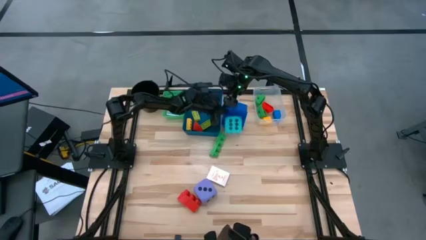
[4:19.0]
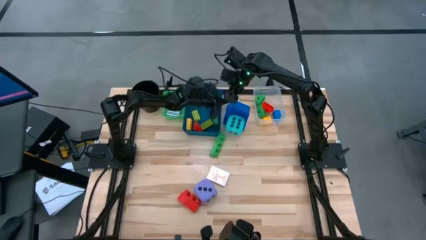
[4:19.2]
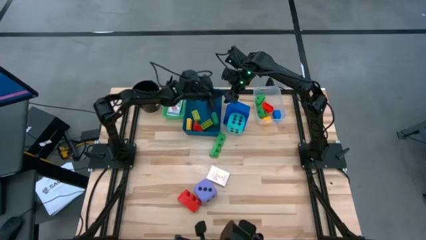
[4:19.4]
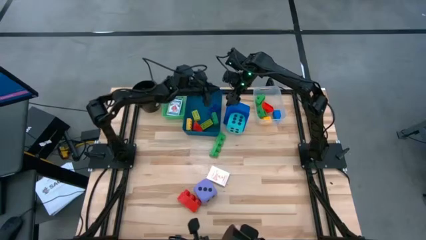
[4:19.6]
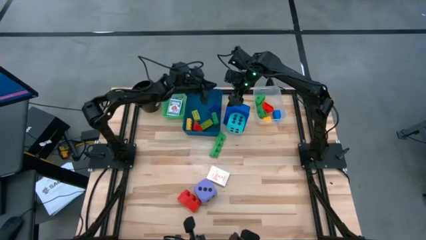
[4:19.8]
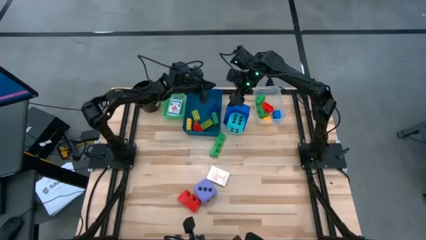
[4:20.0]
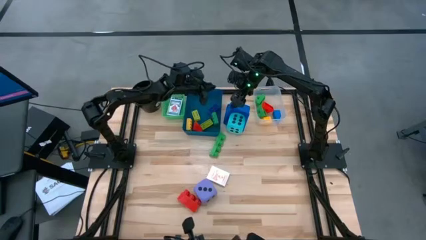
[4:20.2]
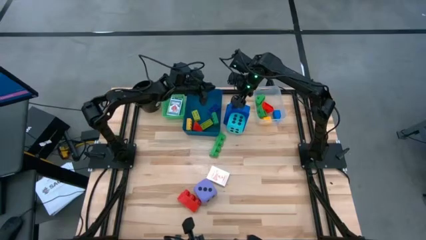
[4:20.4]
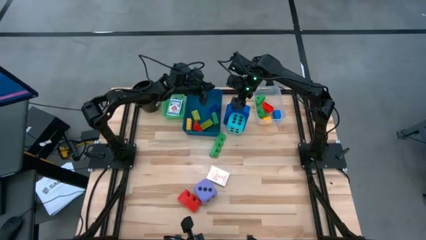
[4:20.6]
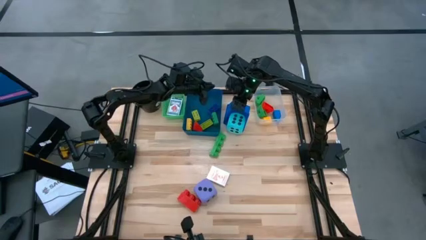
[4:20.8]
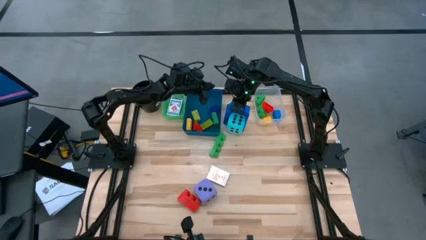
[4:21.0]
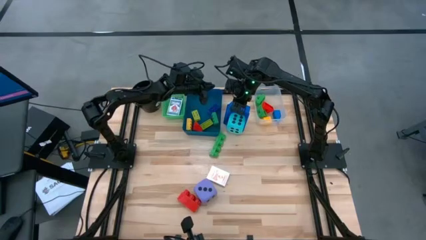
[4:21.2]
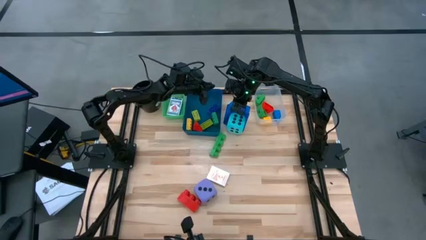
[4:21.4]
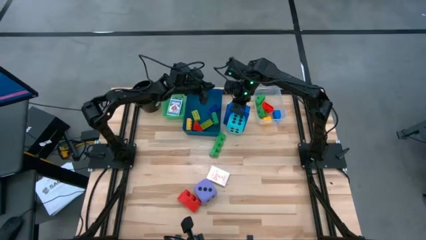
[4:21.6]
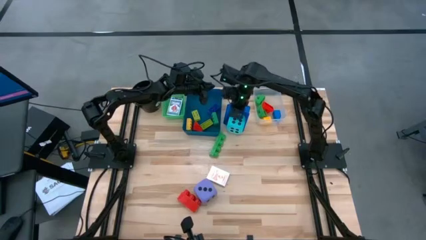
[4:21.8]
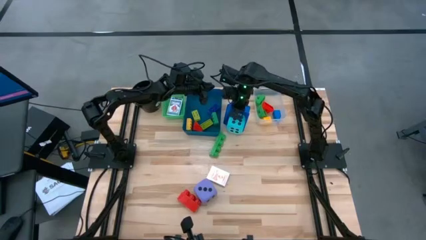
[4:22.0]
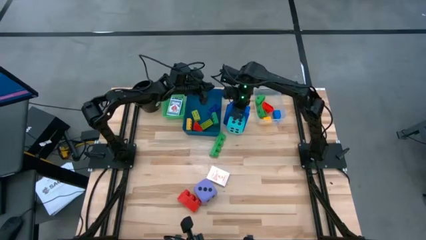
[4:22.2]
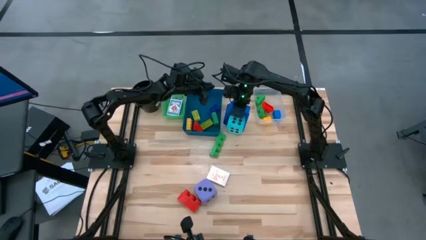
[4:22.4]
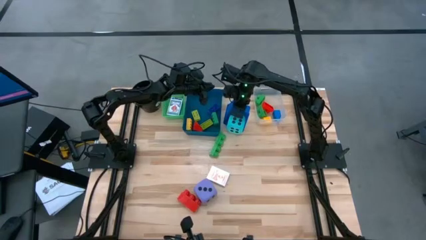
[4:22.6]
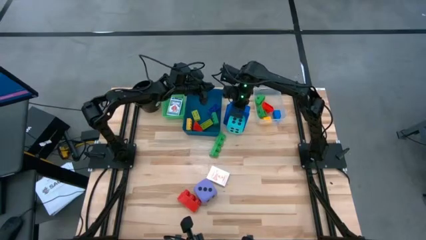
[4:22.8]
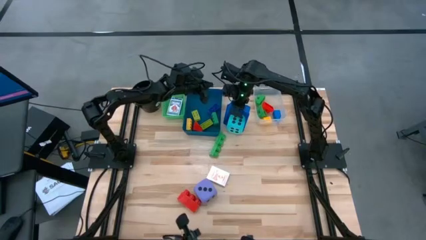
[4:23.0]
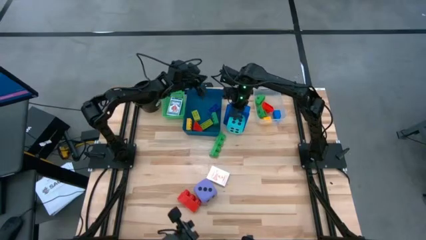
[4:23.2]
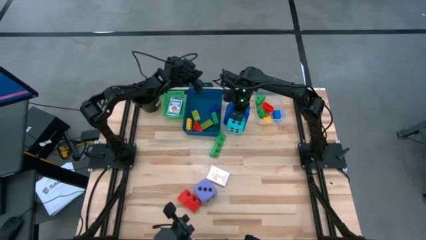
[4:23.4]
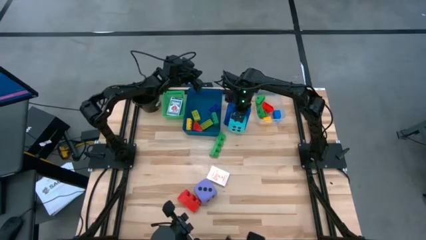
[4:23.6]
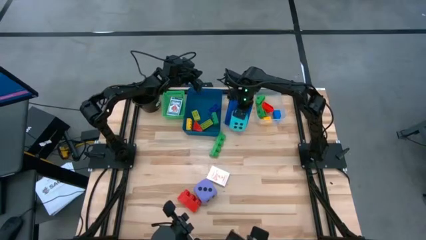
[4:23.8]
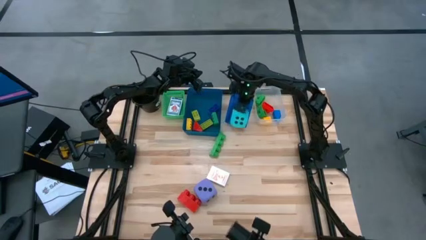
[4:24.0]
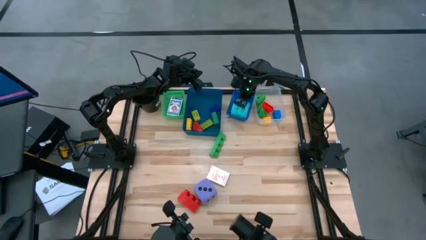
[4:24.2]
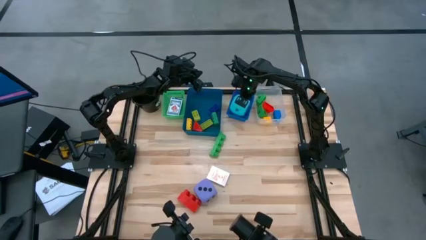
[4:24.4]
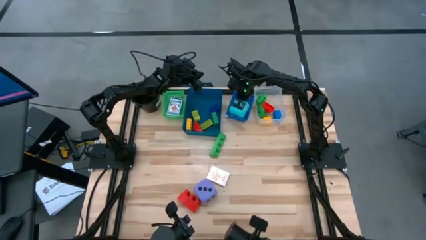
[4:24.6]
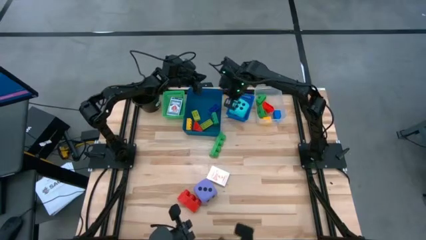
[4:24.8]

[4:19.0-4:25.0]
Task: Pick & Place Toys
Put the blue dice into the blue bin

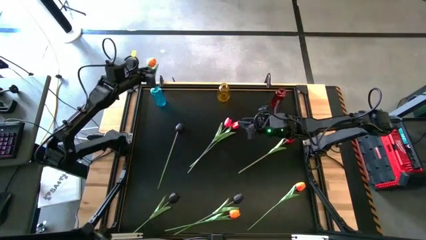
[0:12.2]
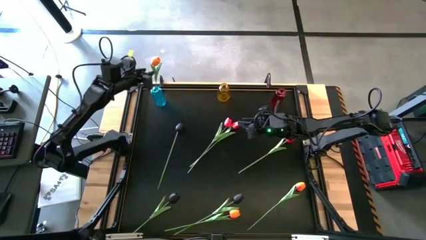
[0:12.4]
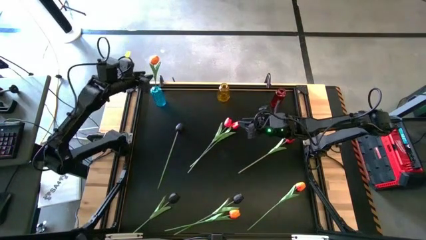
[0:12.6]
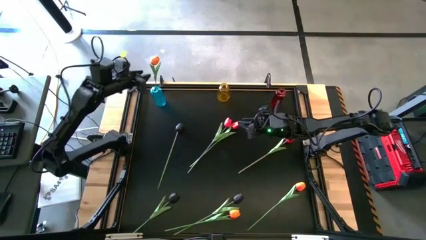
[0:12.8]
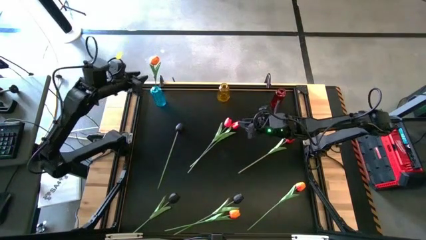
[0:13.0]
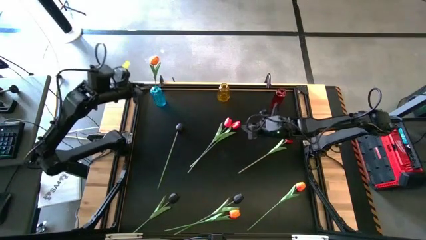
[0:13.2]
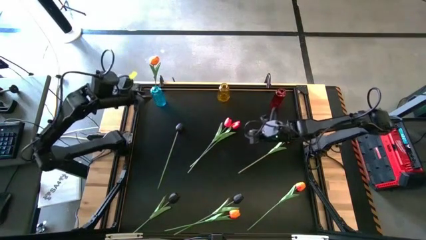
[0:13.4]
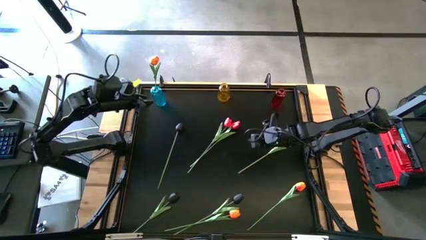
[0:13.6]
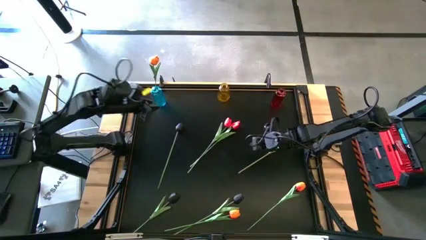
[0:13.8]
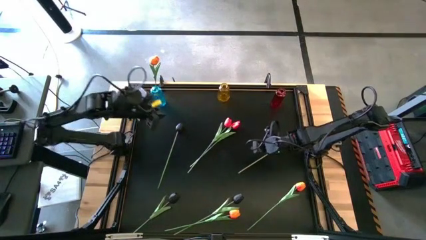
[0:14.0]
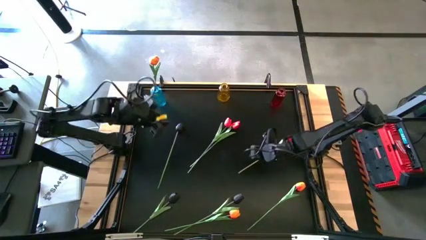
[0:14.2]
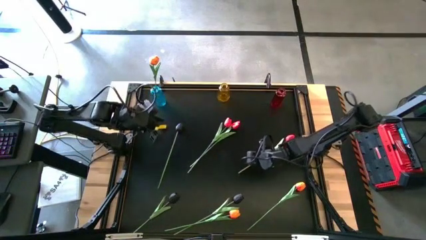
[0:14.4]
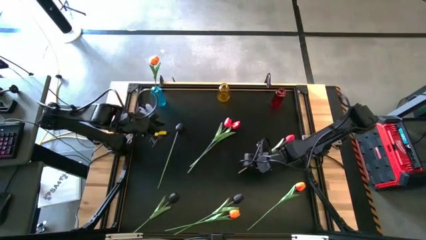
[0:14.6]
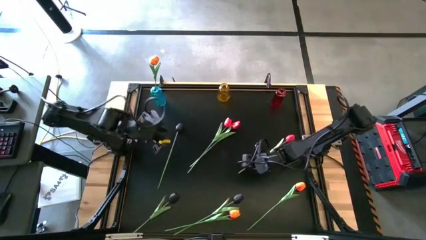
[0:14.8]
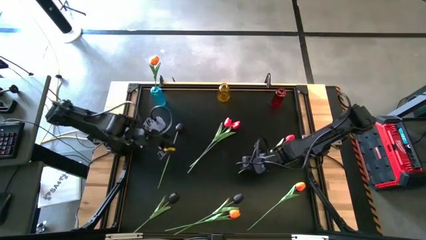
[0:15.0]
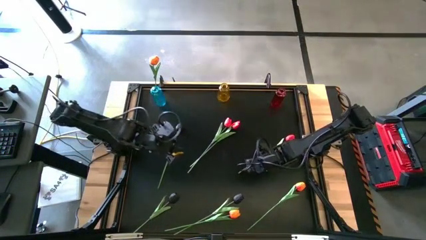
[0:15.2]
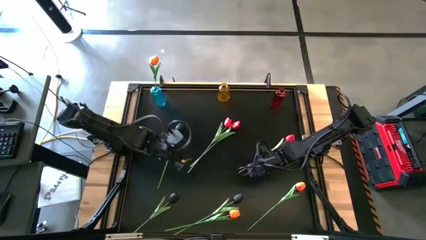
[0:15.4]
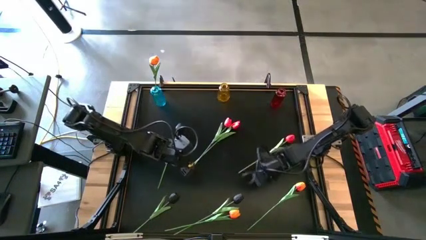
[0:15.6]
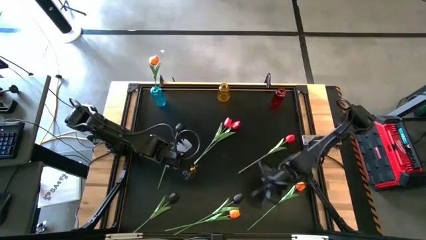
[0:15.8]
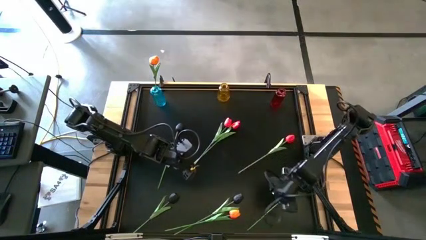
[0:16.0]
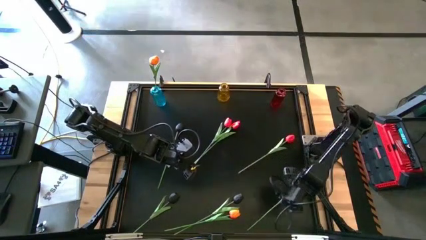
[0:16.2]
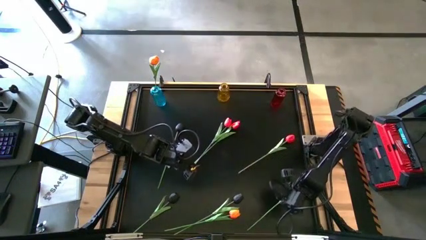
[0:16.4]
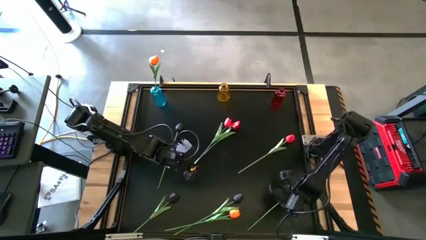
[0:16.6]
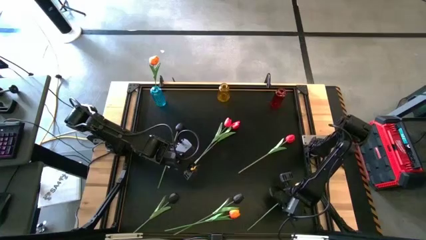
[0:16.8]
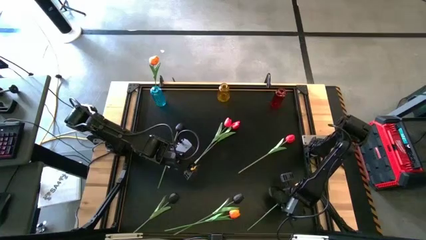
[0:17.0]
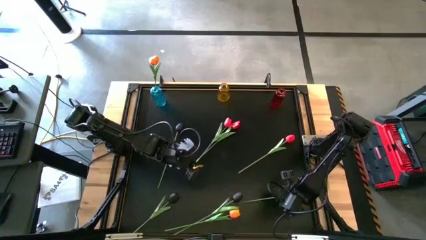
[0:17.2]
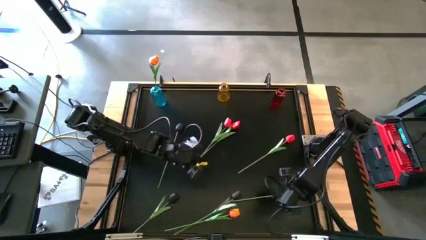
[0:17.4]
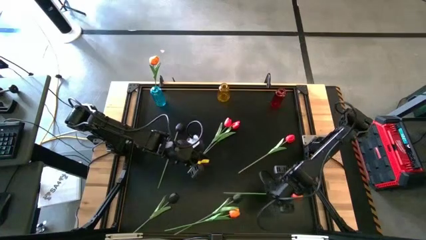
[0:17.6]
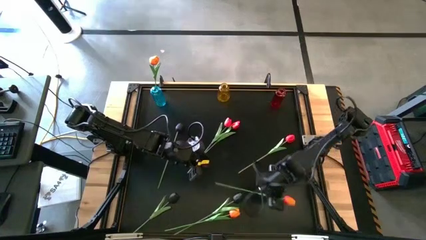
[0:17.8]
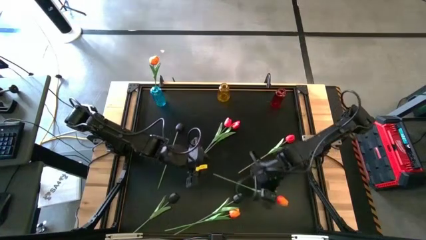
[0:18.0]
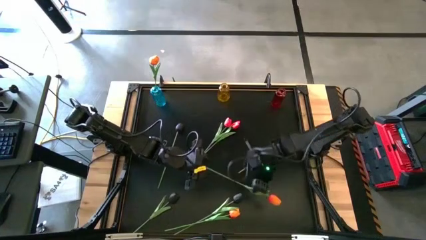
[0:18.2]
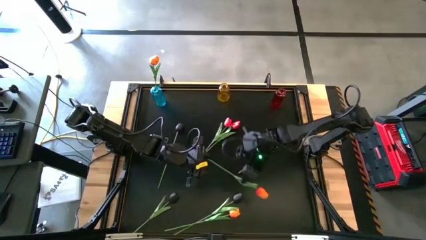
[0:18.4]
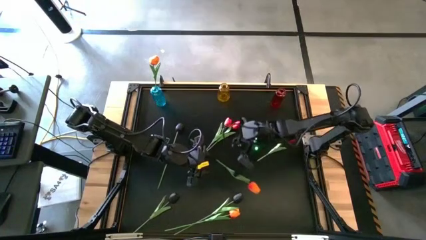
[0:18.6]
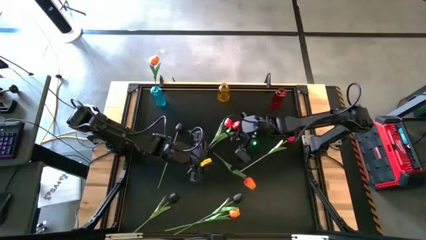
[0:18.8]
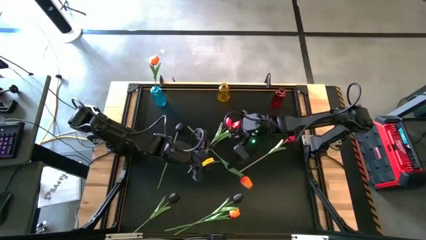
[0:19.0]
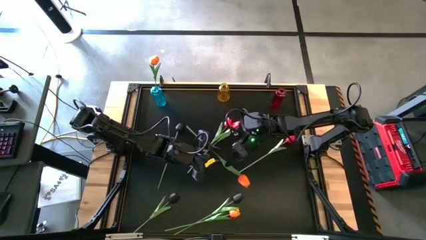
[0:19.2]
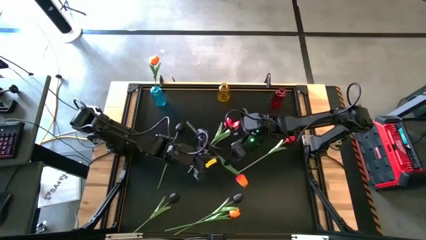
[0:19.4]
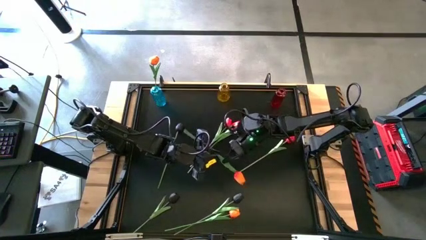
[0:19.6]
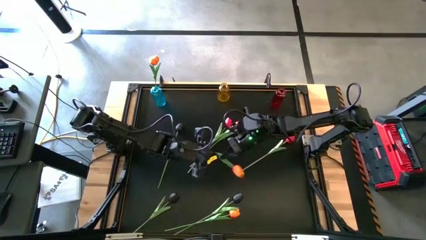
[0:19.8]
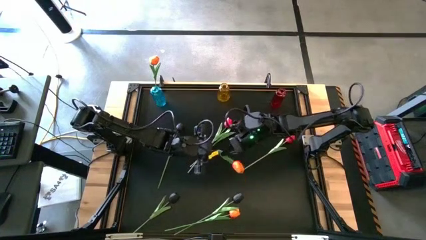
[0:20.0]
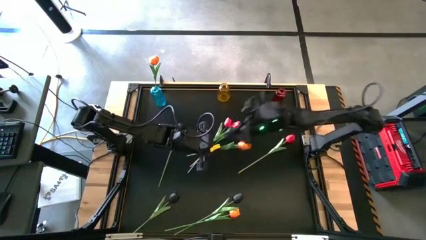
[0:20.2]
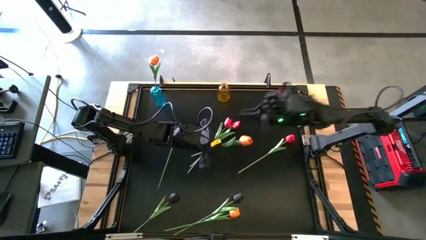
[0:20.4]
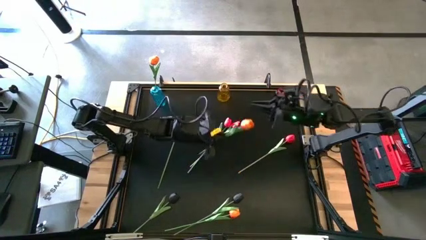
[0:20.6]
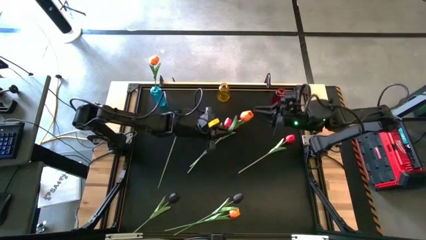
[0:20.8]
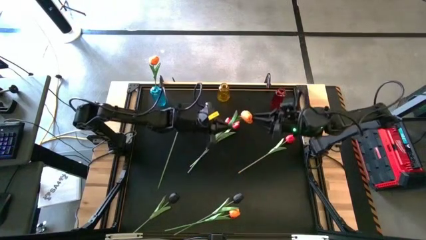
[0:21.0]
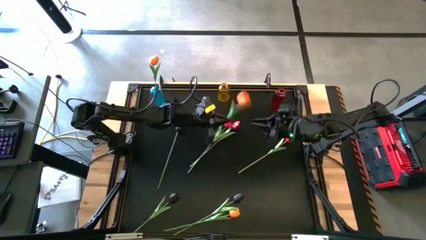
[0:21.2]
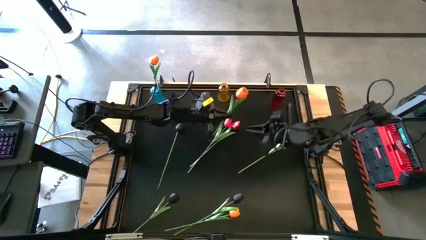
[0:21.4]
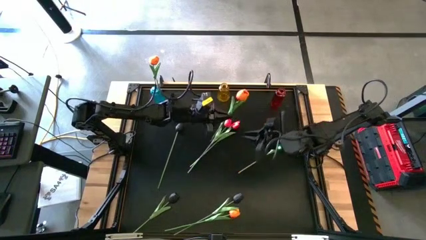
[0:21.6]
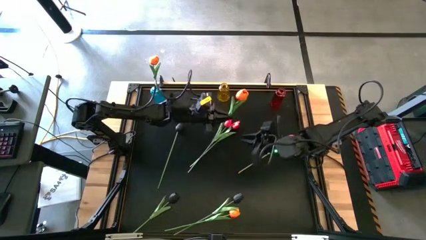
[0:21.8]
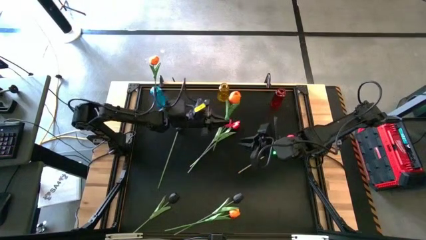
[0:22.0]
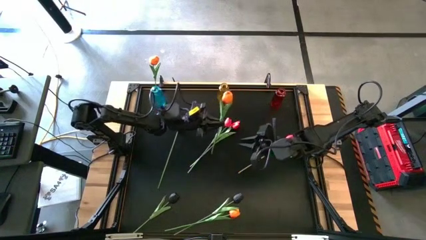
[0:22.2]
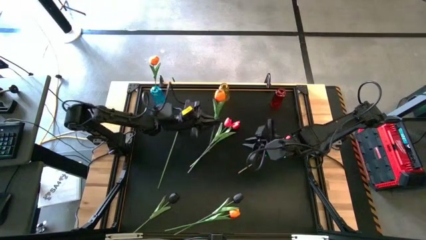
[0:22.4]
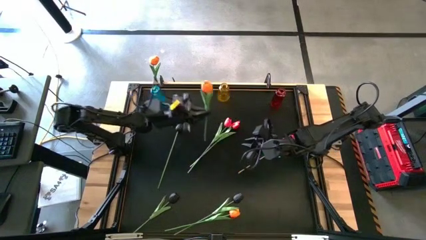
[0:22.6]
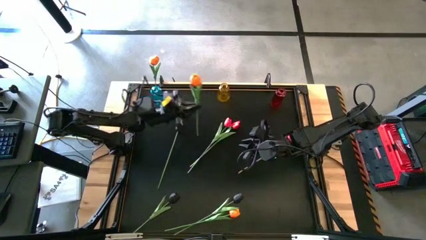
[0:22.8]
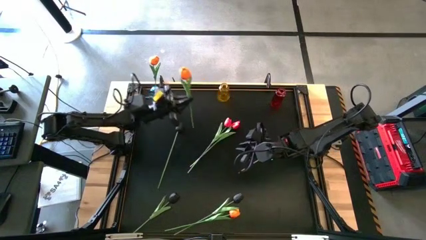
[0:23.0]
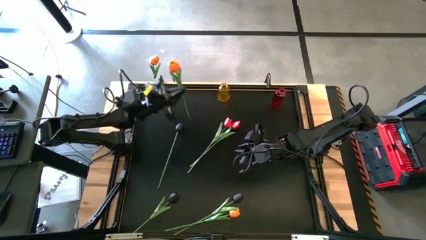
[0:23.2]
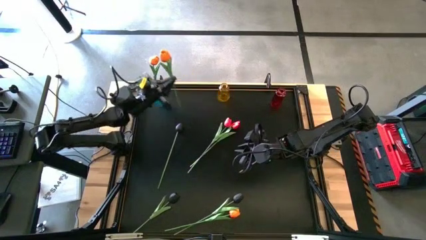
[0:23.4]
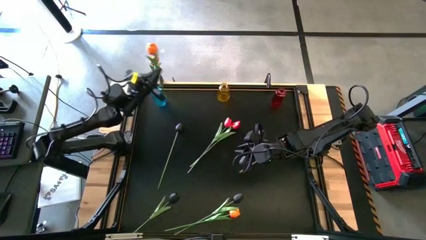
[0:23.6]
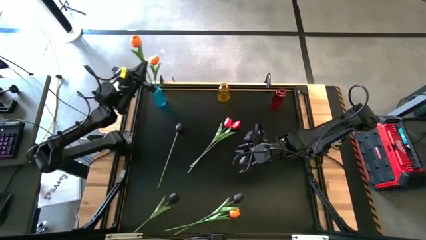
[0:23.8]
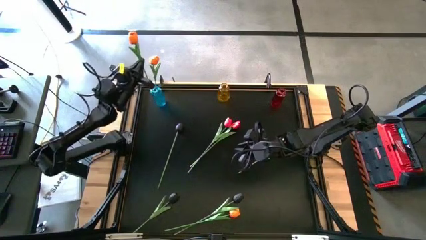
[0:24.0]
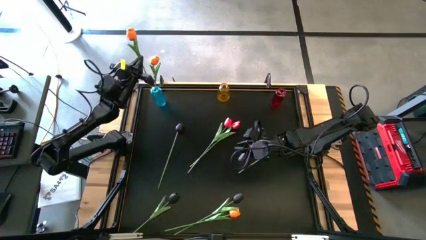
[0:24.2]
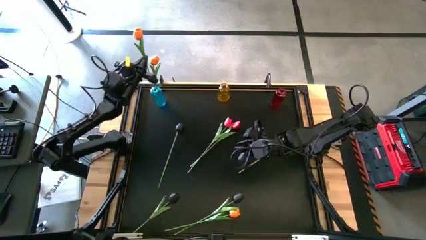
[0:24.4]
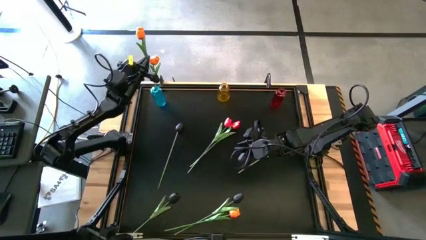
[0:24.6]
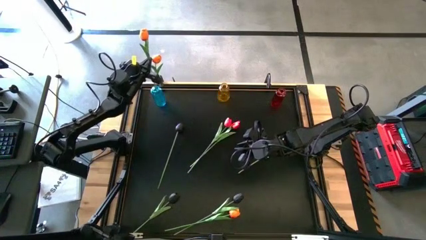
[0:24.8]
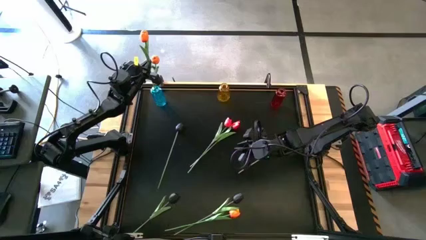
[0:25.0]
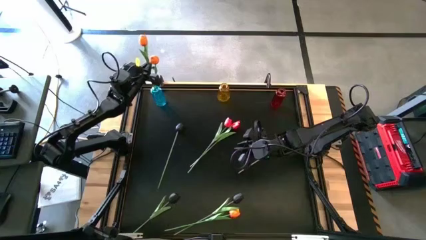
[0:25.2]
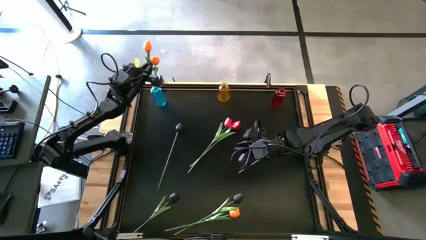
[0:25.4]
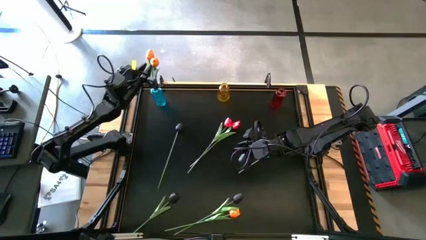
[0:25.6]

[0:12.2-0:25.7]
Task: Sort flowers into vase by color
Put the right orange flower into the blue vase
